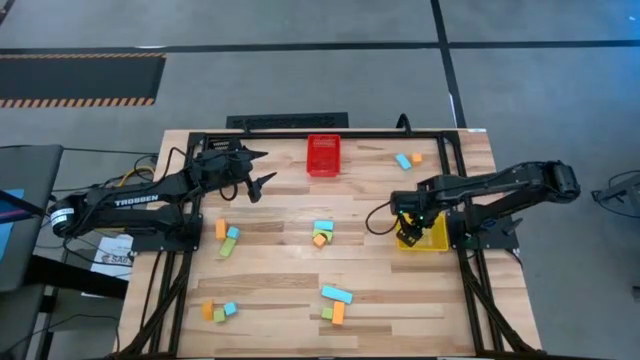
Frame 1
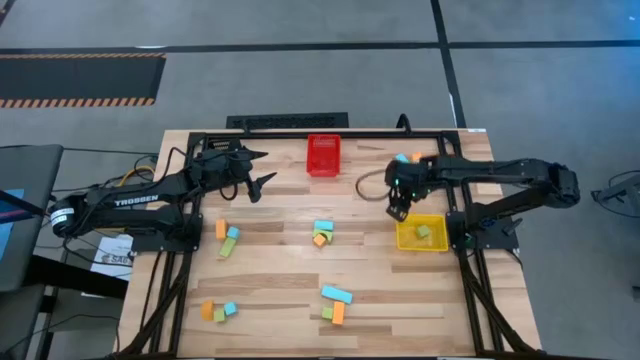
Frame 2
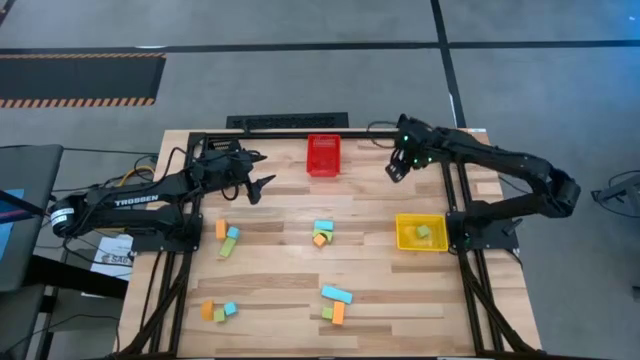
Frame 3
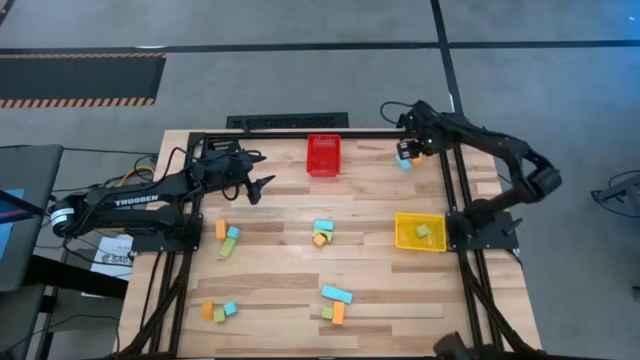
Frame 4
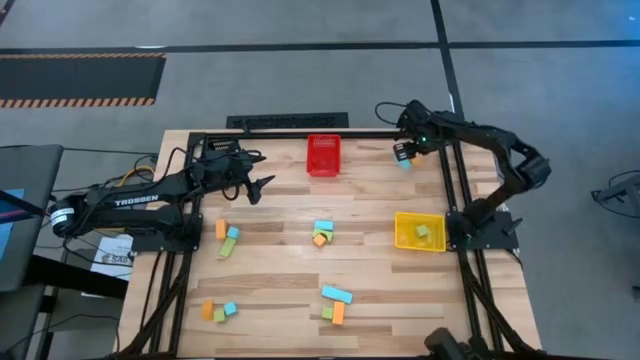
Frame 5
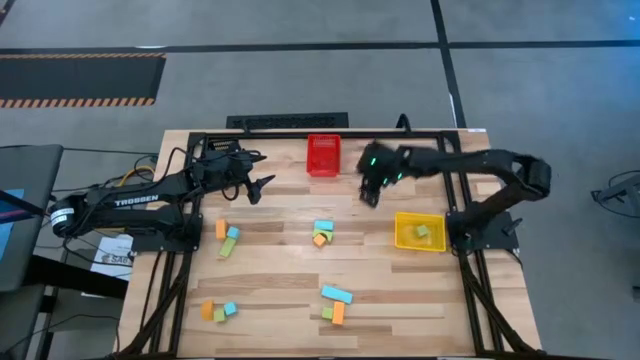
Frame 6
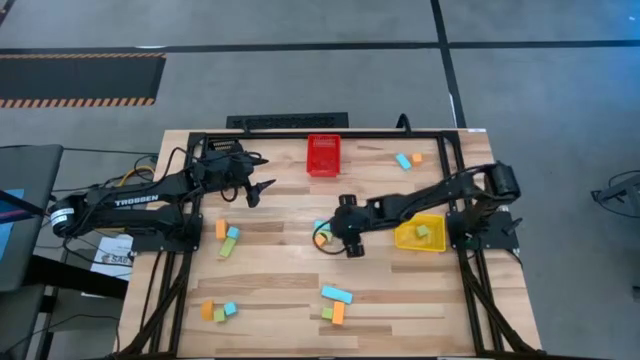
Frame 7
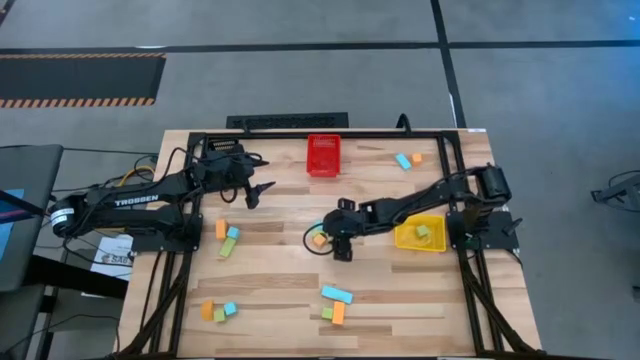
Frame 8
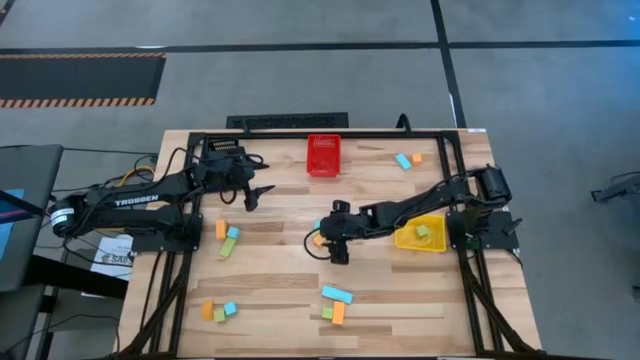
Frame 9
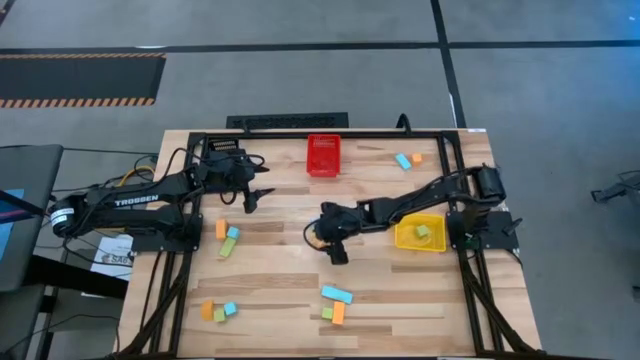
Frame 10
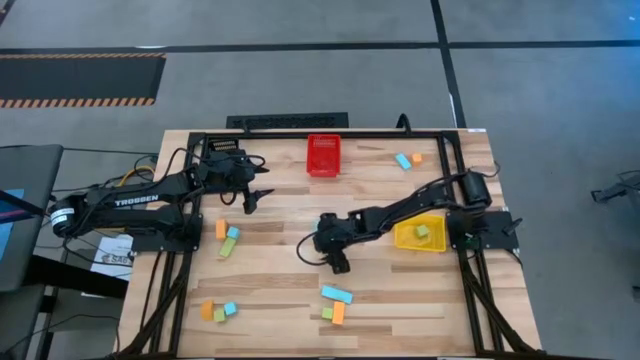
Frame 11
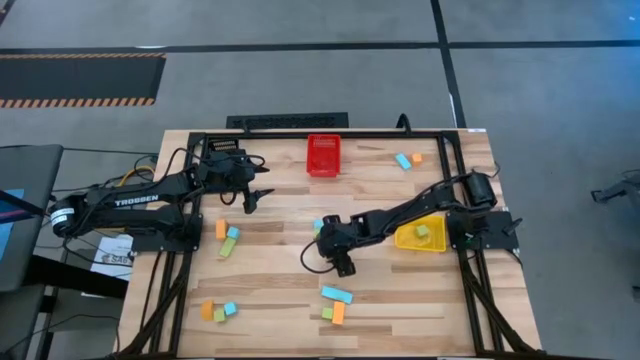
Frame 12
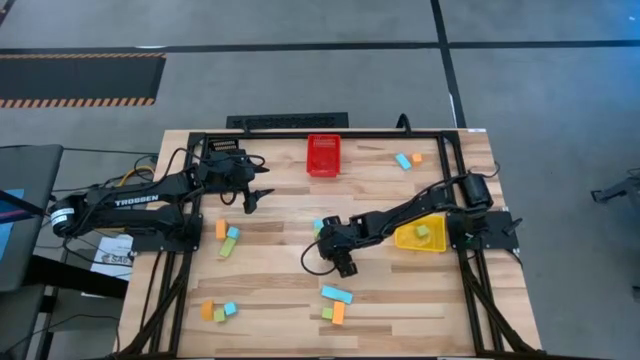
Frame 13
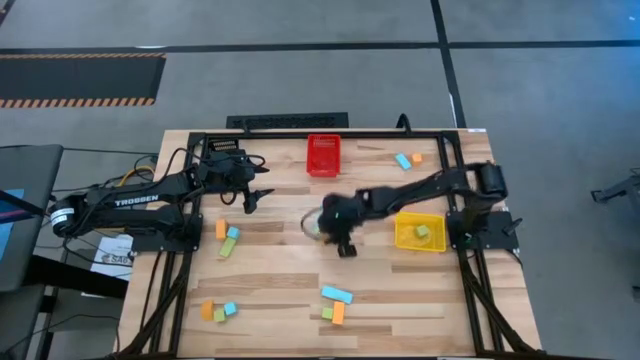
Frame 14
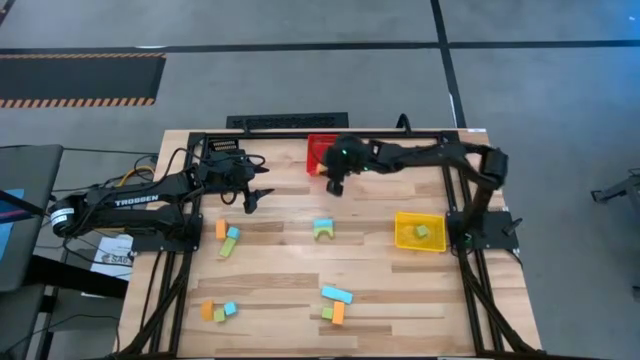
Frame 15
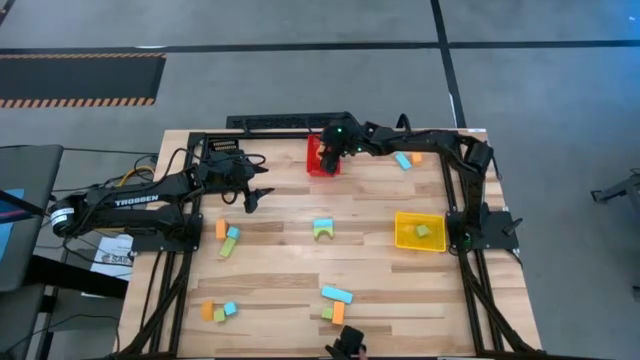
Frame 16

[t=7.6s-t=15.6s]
Task: Sort & place blocks by color
Put the orange block into the red bin

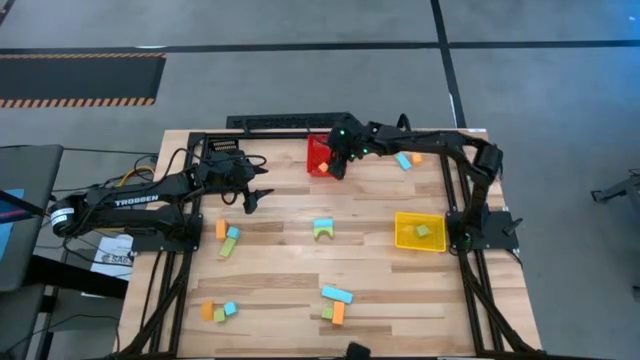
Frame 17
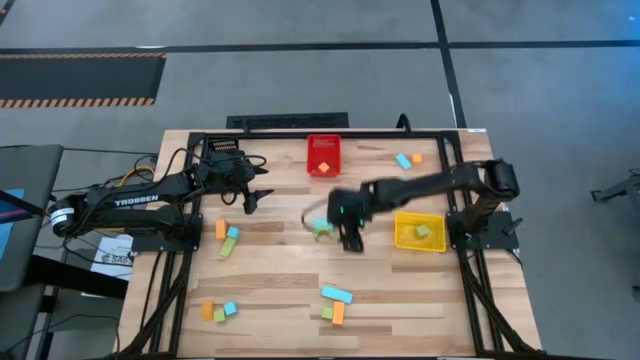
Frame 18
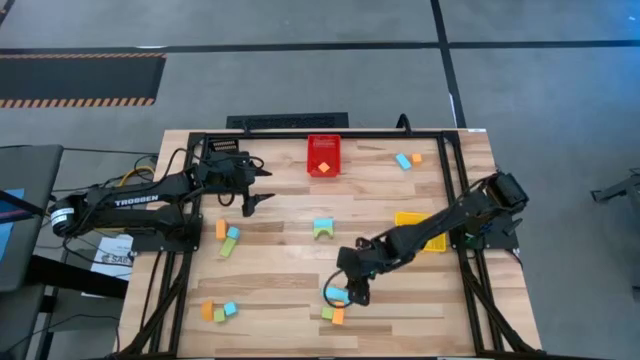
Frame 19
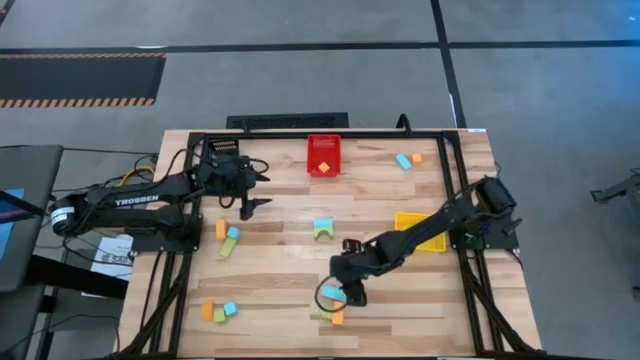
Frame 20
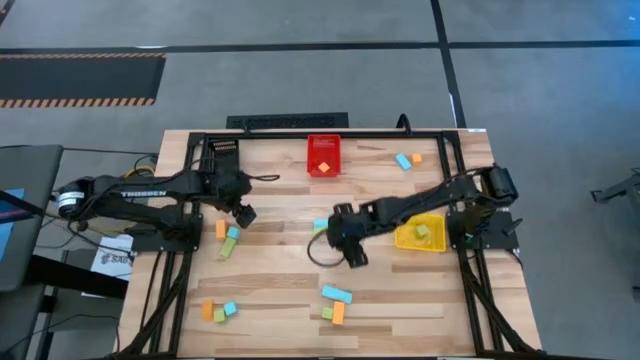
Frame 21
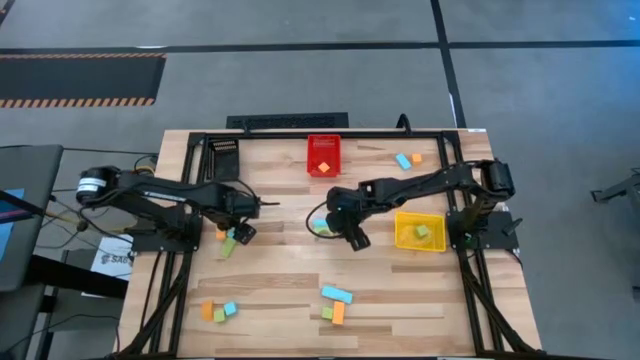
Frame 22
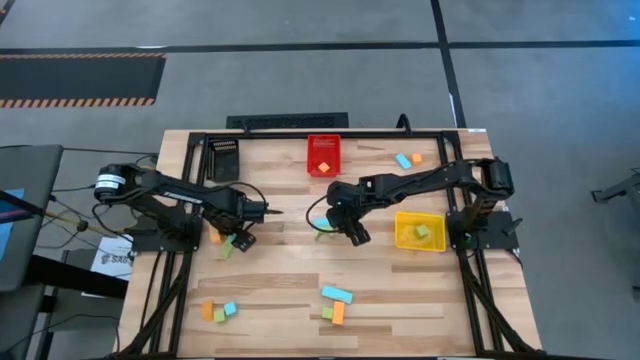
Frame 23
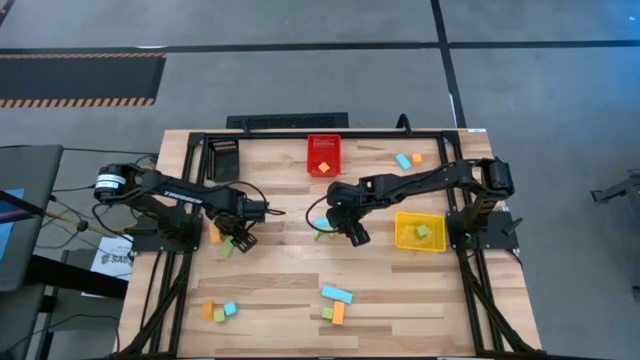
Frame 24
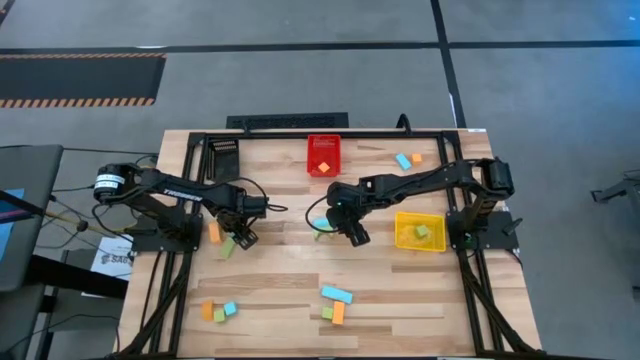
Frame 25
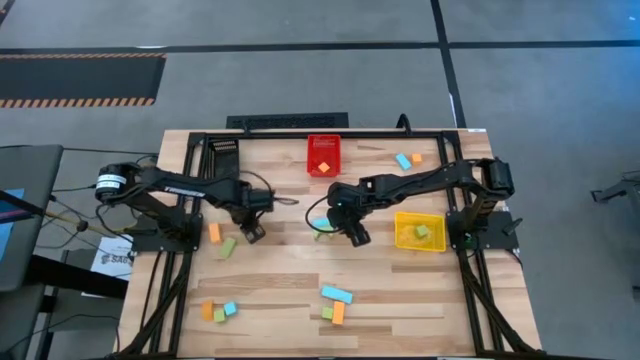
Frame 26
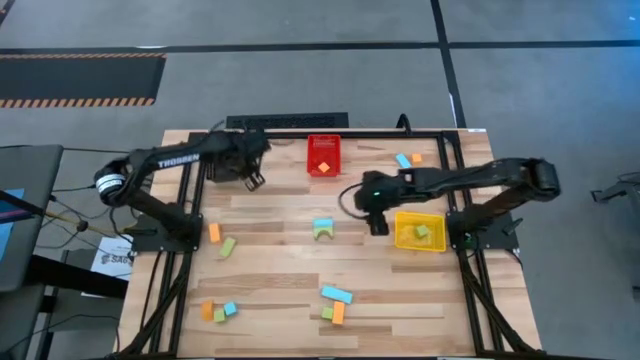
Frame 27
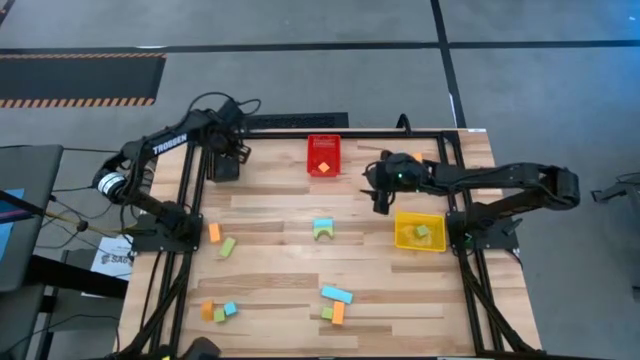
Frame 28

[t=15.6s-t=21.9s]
Put the blue block into the black bin

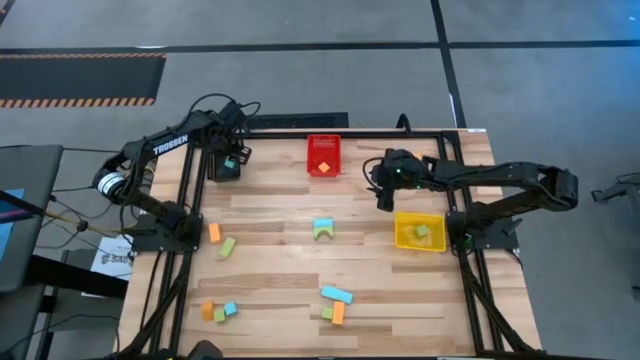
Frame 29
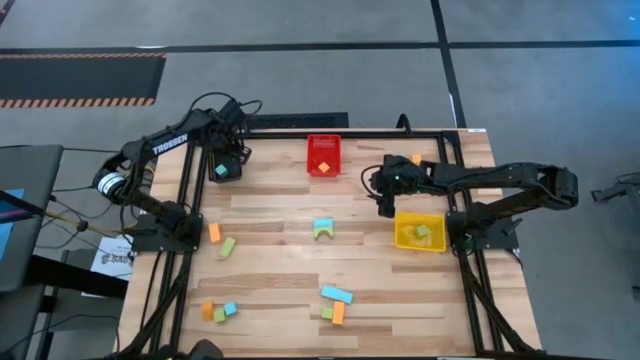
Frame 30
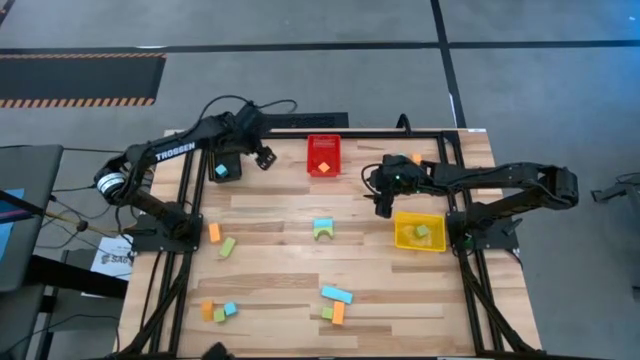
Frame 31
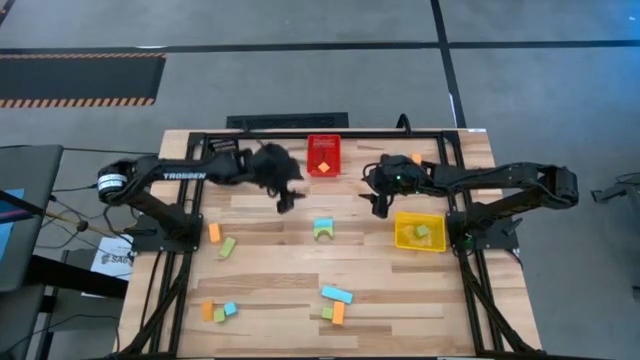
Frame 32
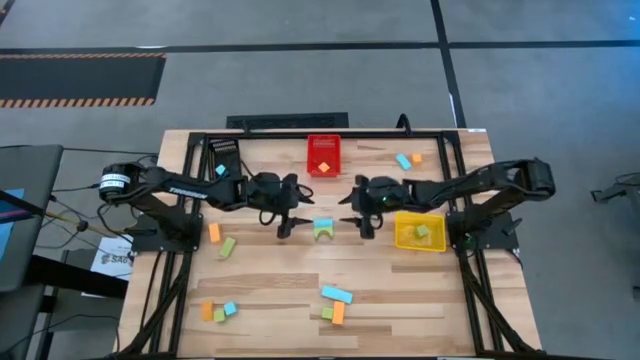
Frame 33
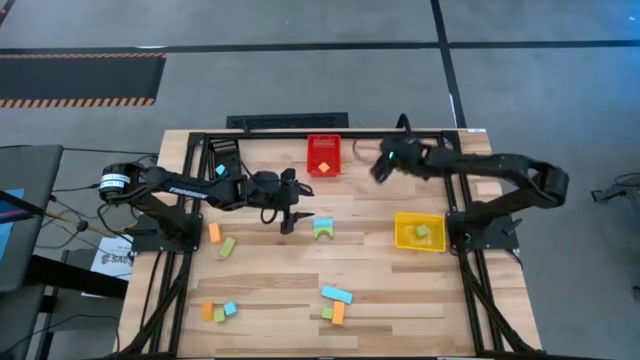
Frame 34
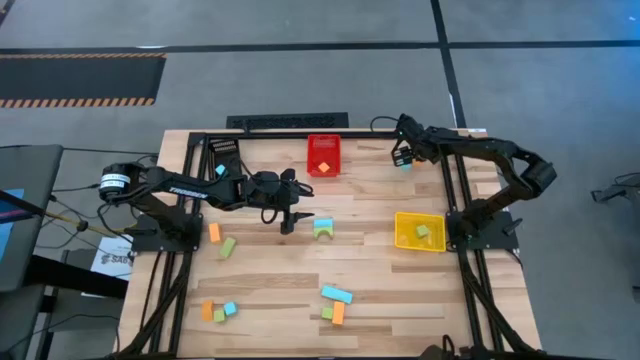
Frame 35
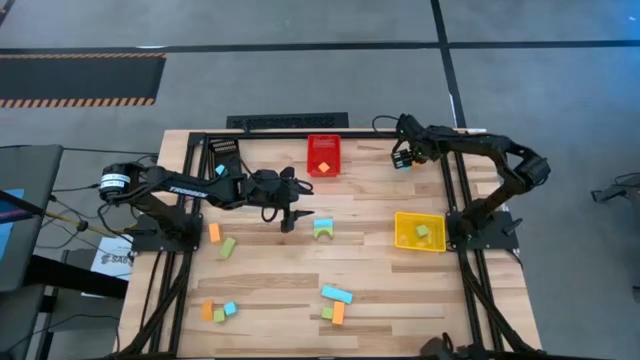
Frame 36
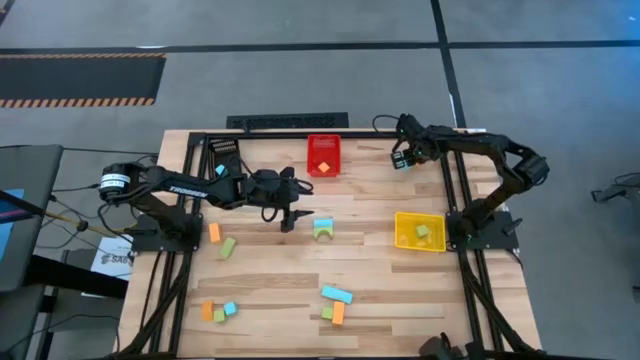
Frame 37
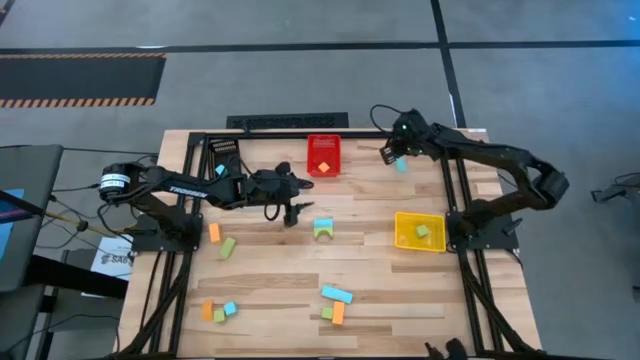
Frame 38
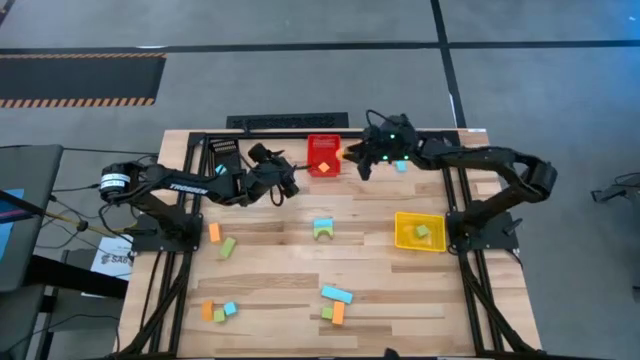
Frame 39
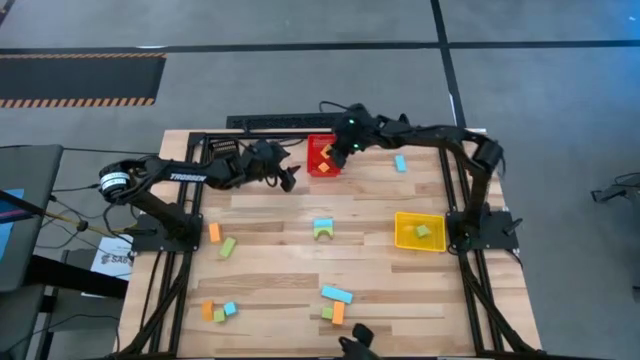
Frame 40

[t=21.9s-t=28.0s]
Put the orange block into the red bin

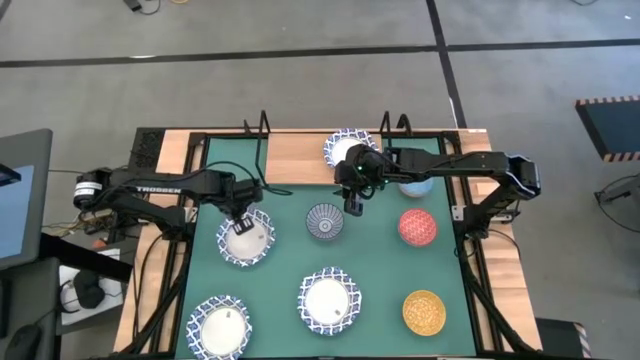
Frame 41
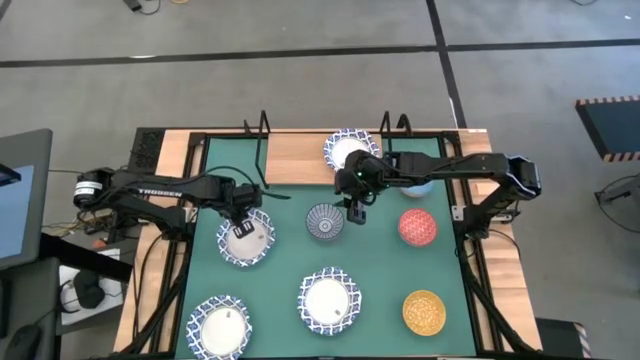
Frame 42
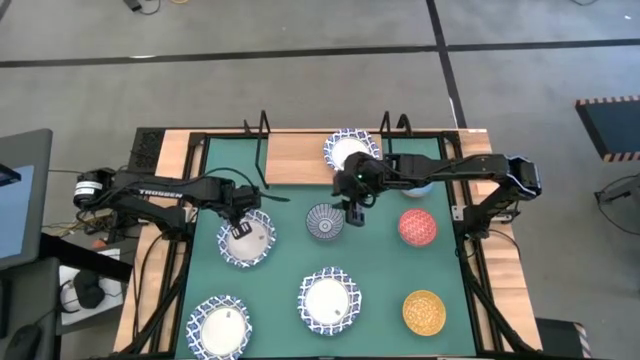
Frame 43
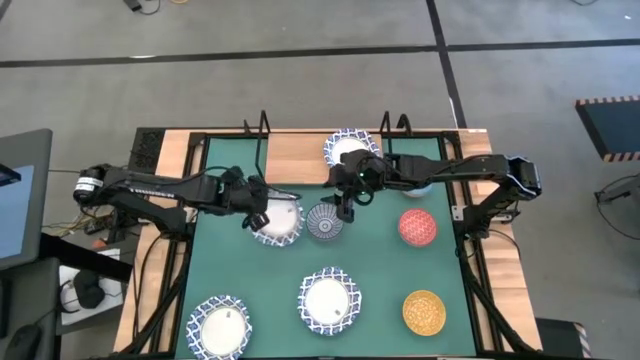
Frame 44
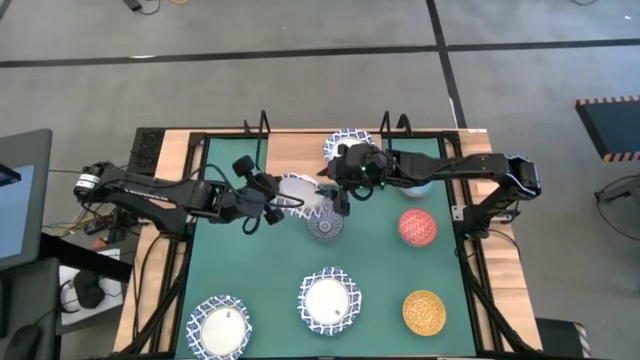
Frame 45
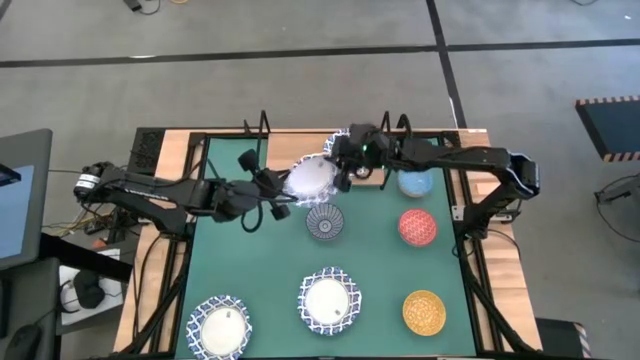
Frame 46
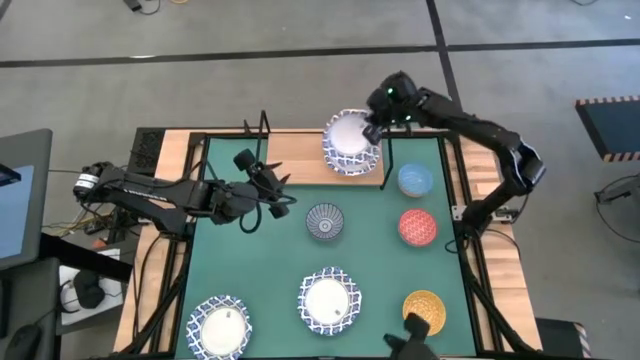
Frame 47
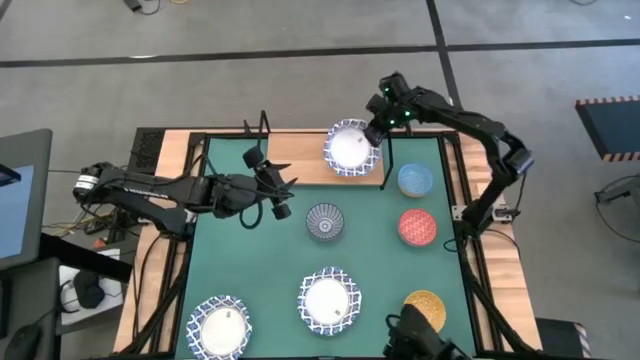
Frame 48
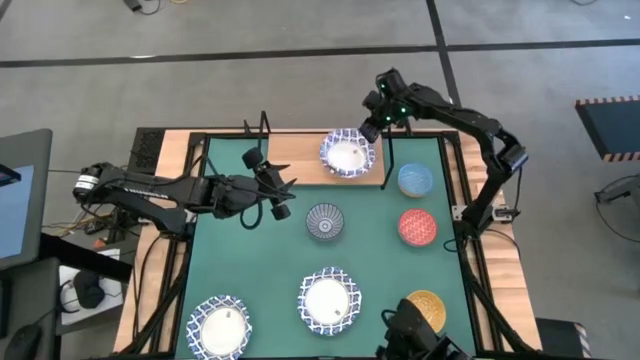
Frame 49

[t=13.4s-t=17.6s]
Task: Place and stack bowls onto a shelf
Stack the white bowl on top of the other white bowl on the shelf
